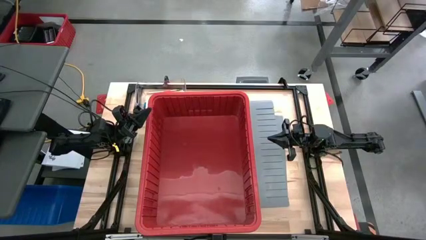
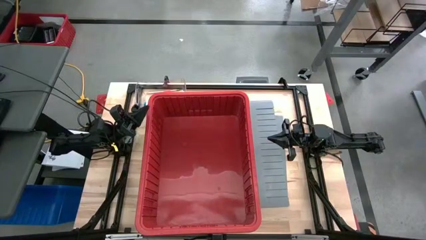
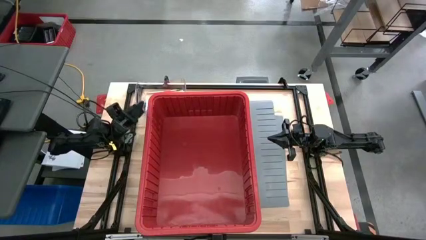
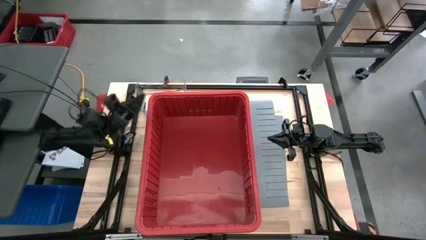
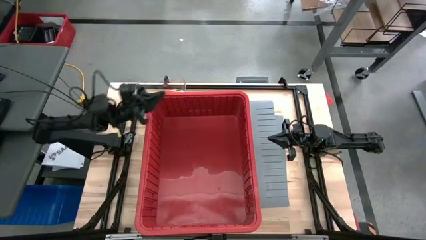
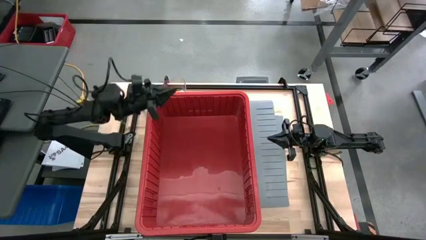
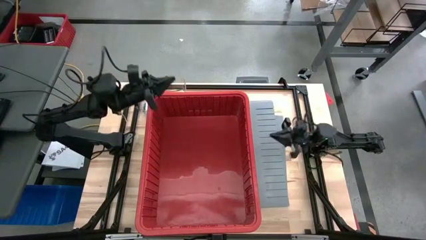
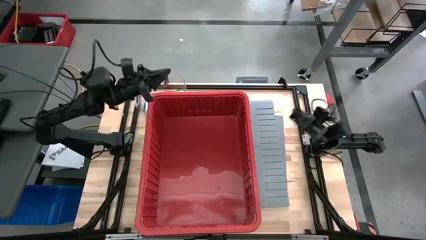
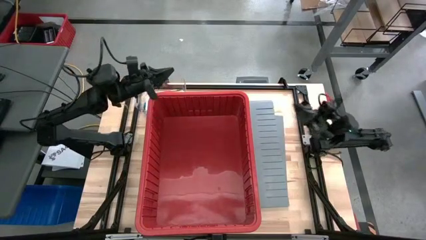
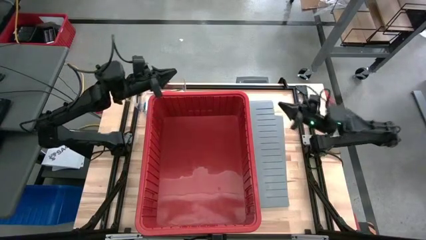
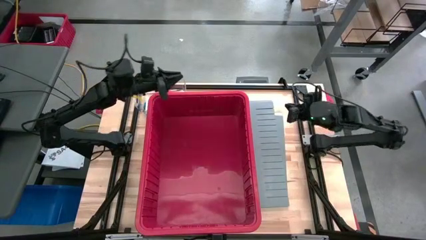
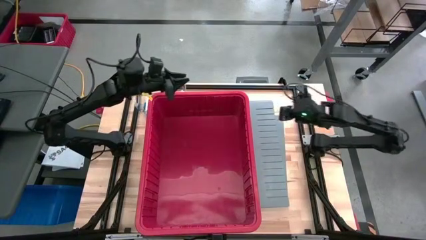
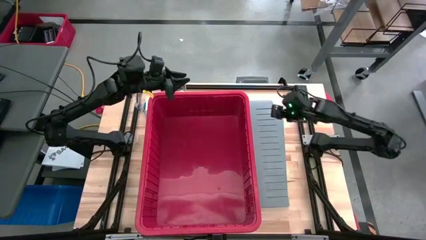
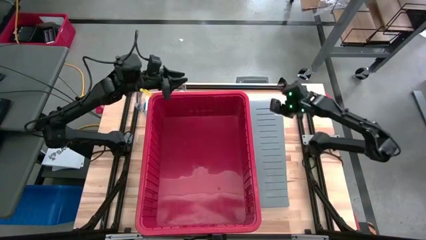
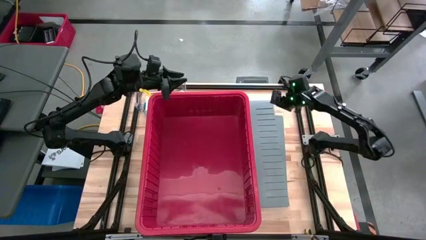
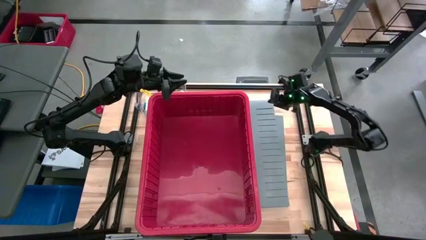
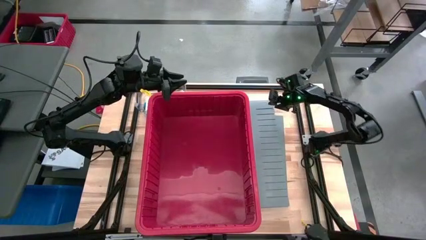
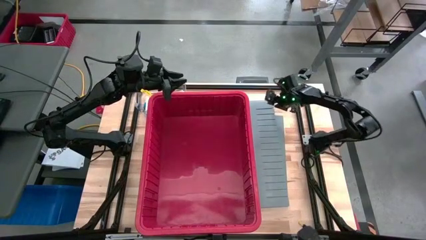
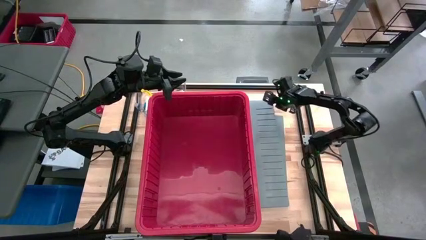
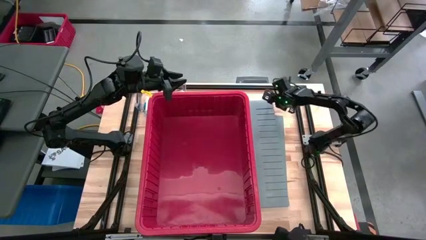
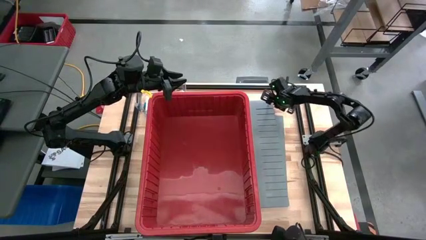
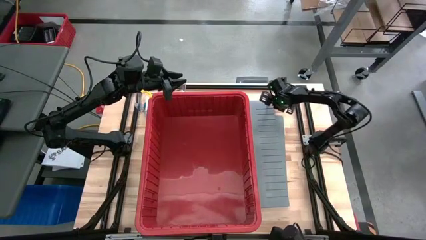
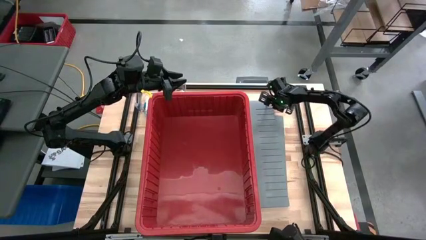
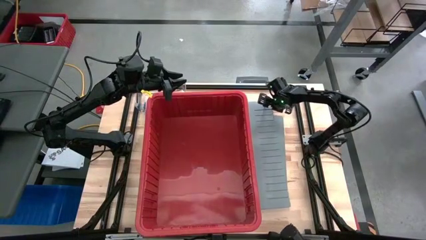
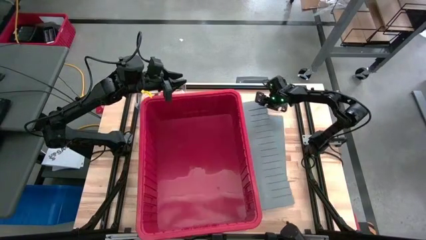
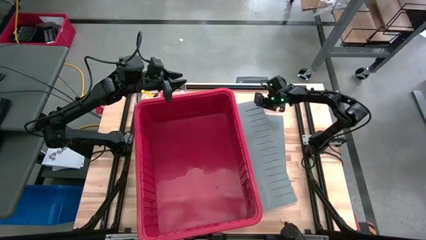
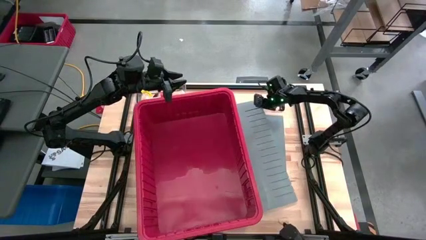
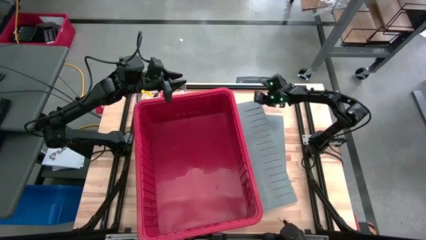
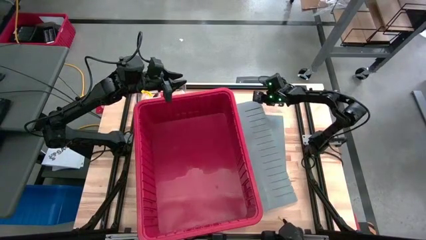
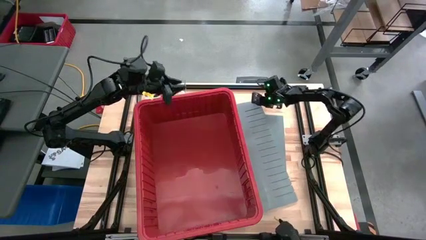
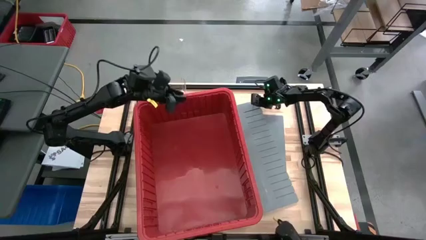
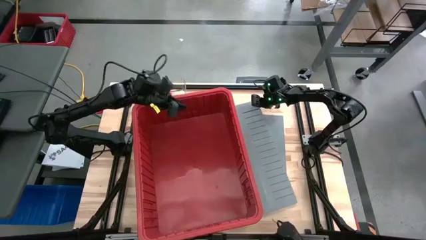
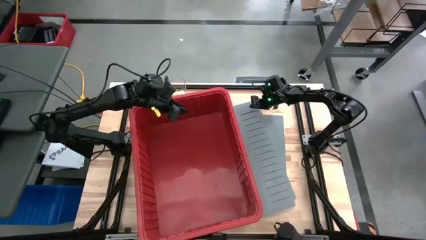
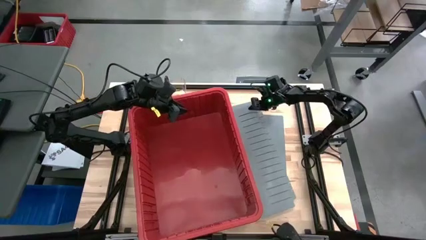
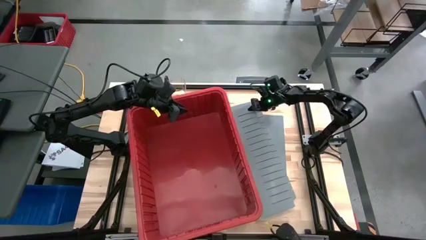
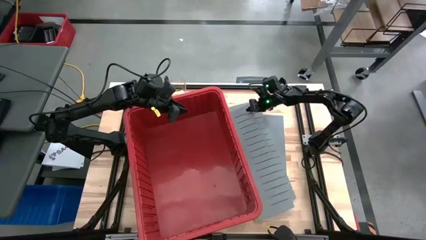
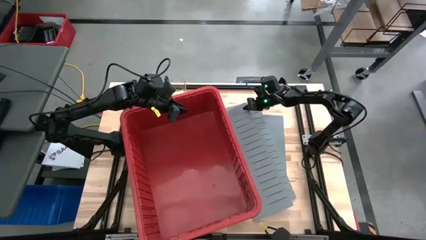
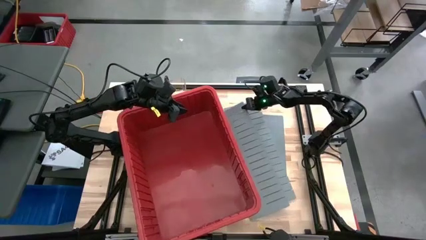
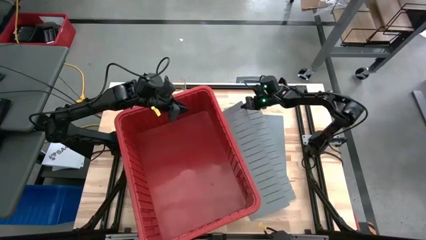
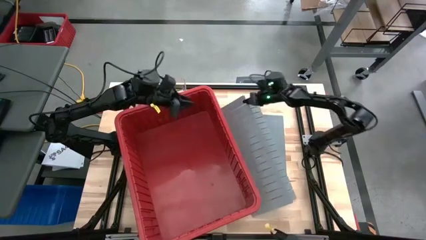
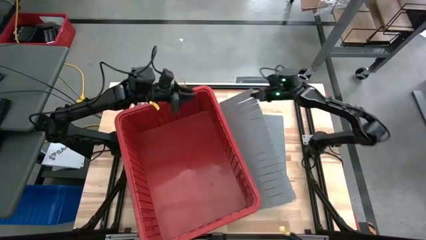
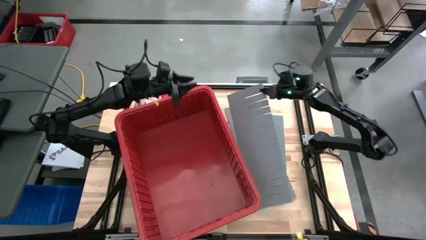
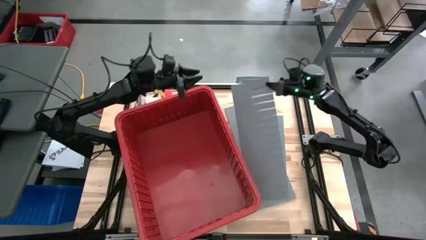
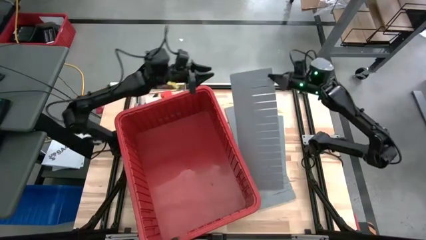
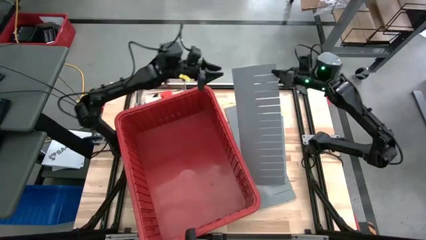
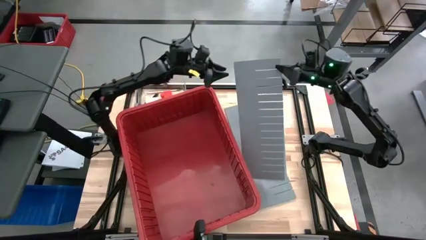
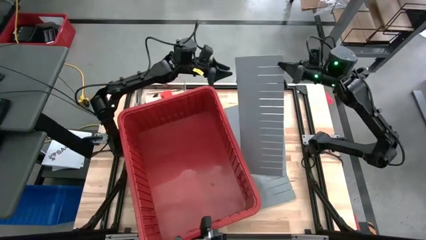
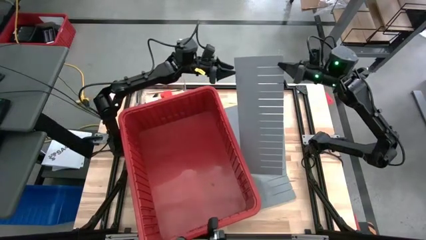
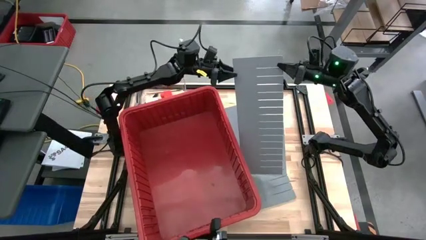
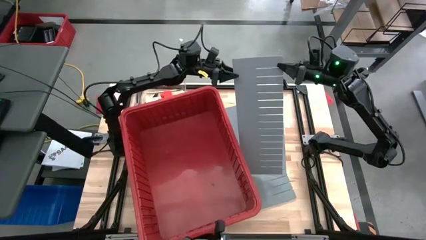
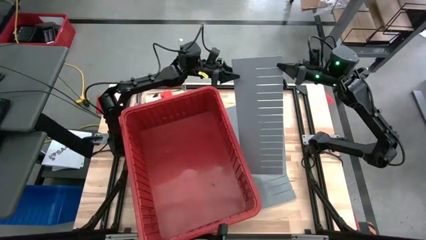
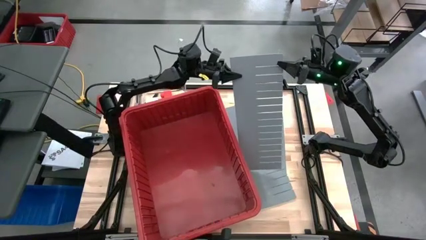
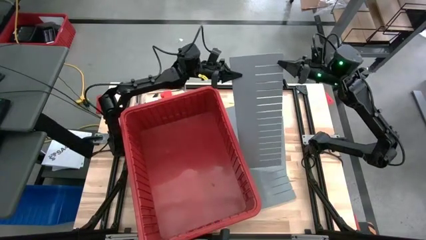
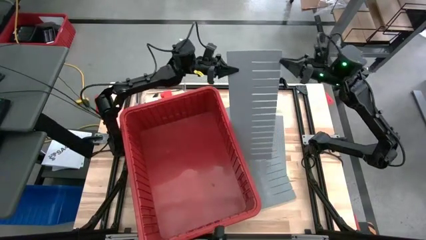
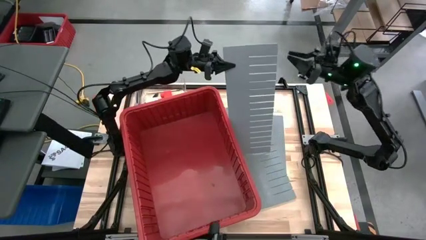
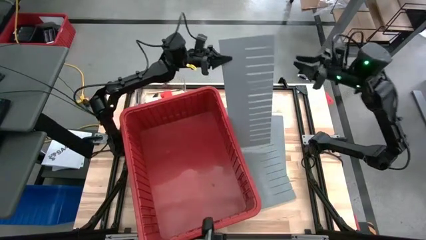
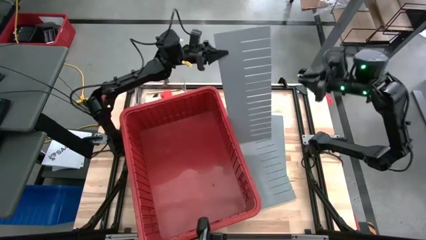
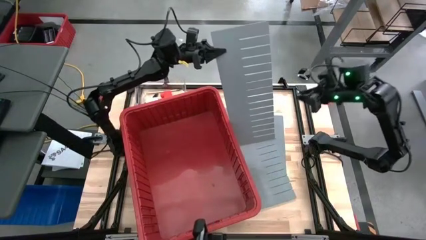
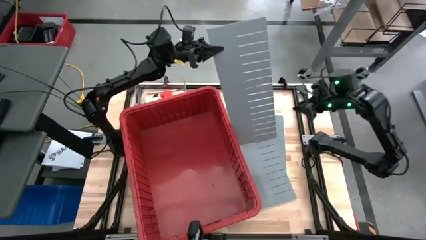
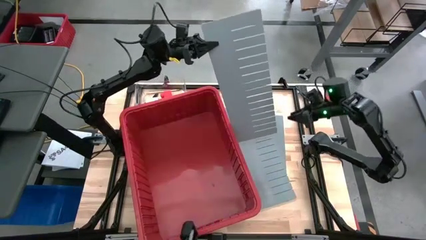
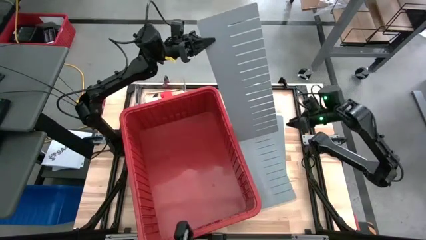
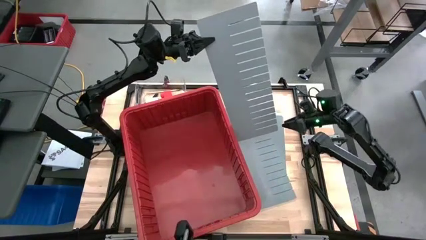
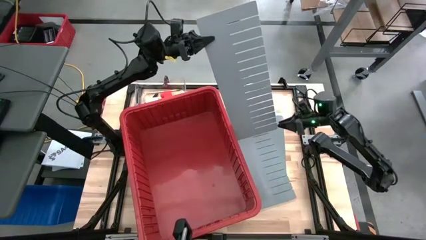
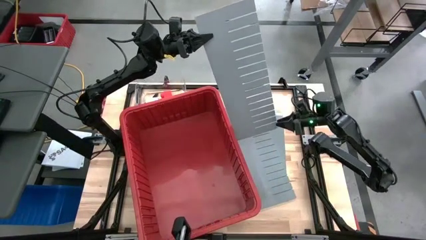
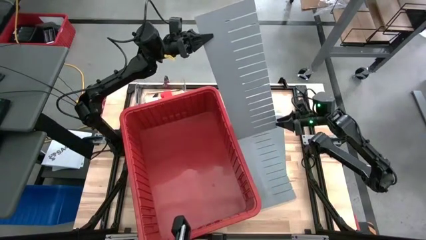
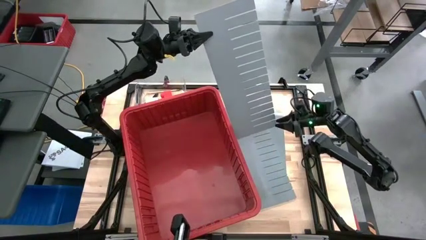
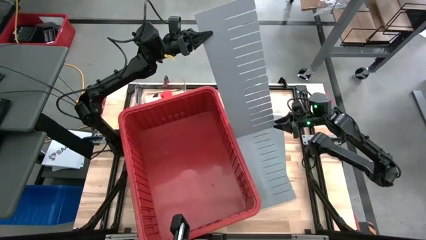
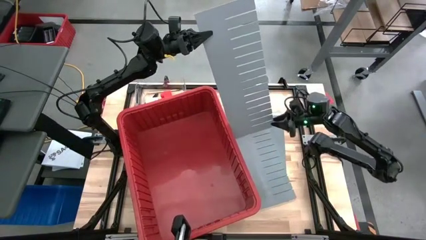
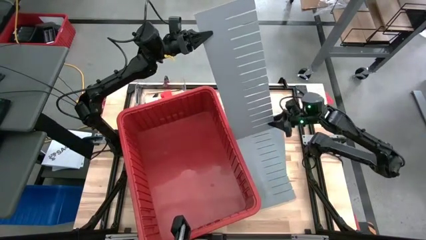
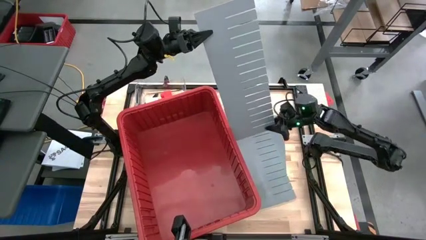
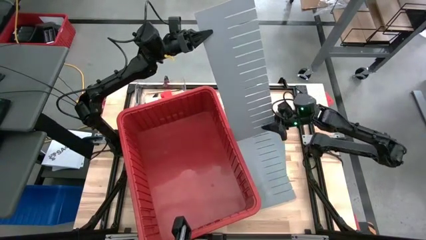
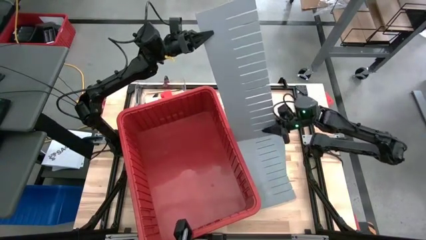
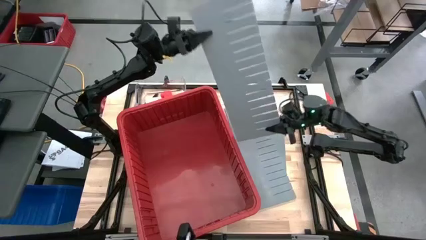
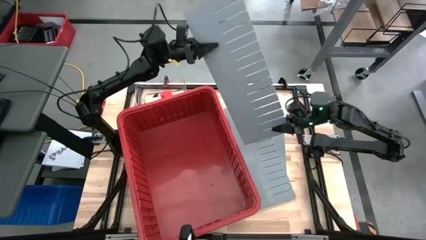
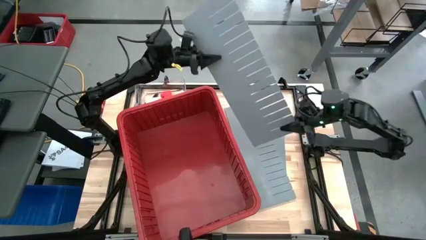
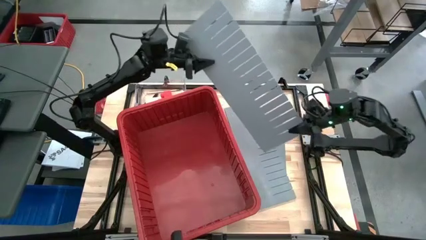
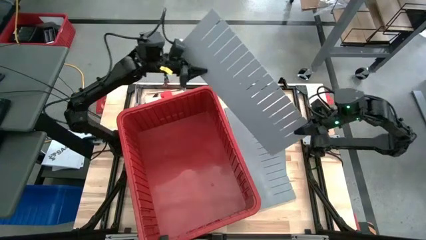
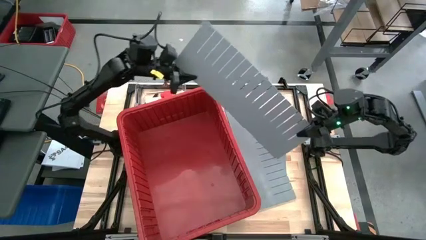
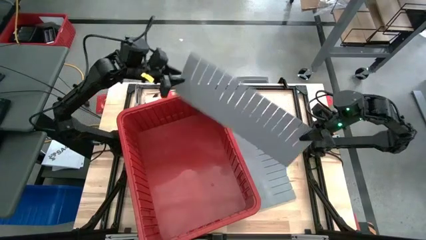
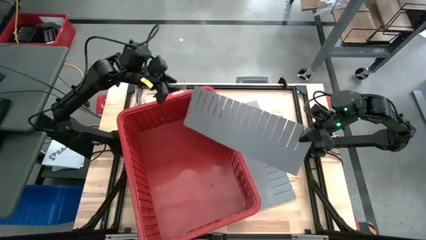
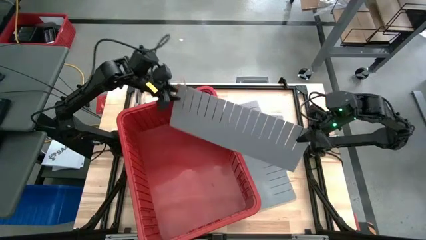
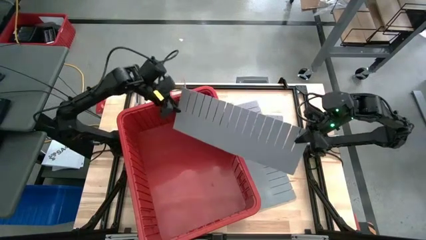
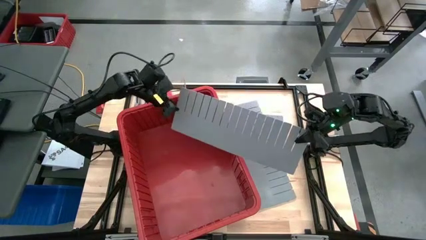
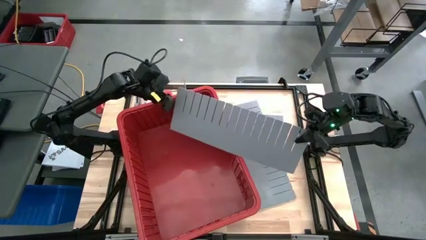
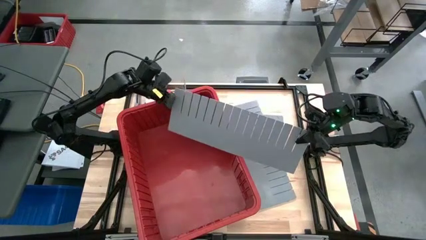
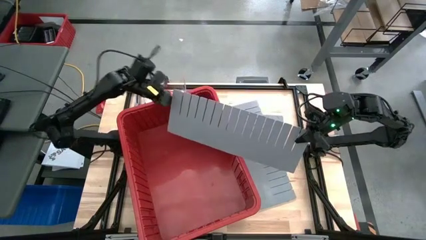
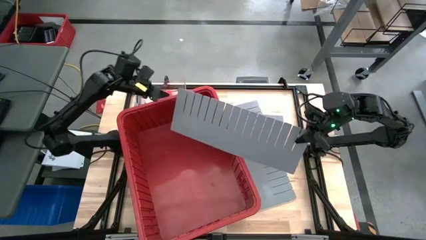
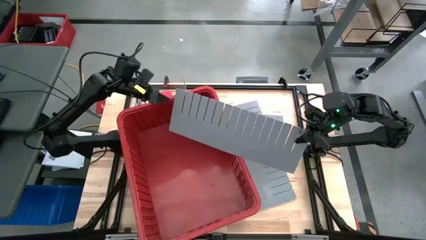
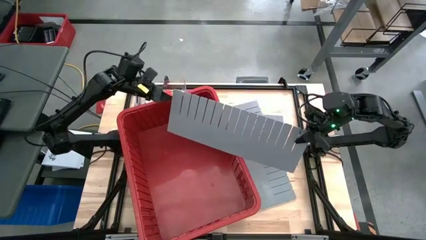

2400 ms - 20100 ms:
Task: Sort blocks
Assemble the bin divider into the red bin
